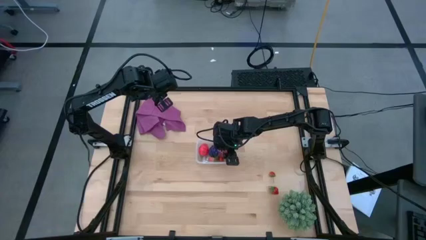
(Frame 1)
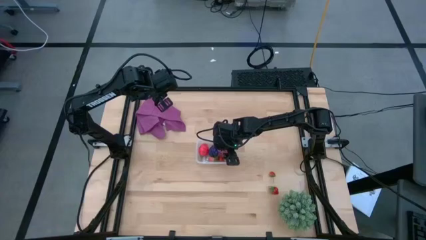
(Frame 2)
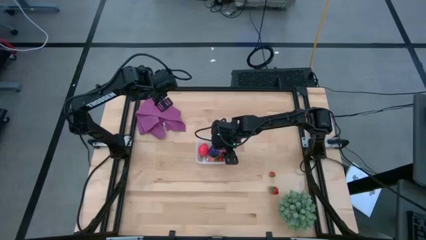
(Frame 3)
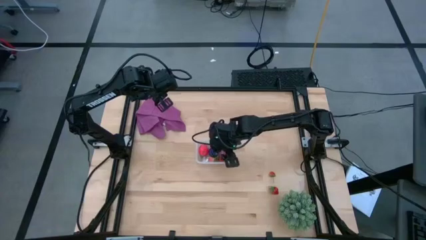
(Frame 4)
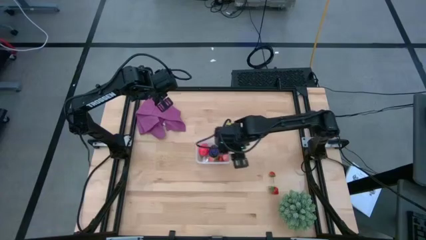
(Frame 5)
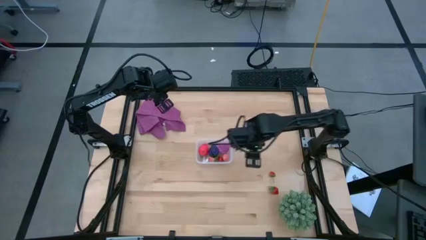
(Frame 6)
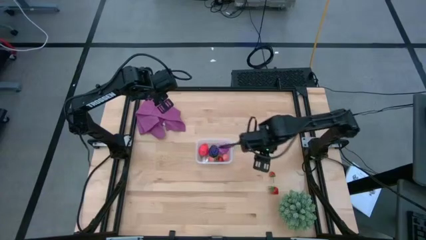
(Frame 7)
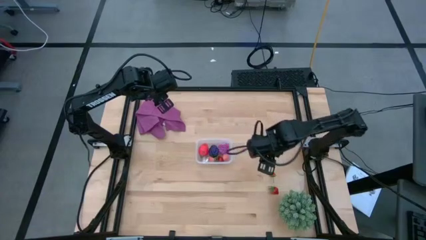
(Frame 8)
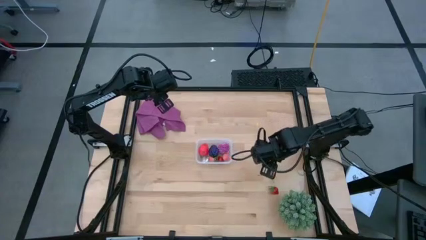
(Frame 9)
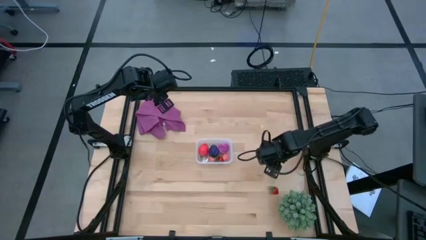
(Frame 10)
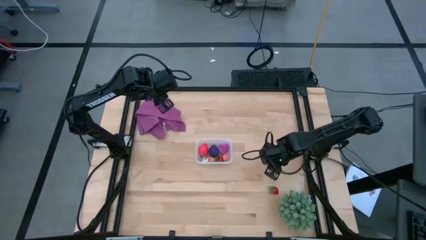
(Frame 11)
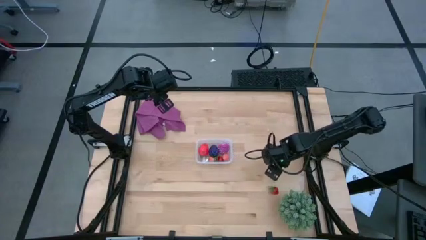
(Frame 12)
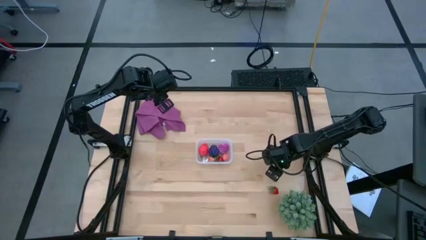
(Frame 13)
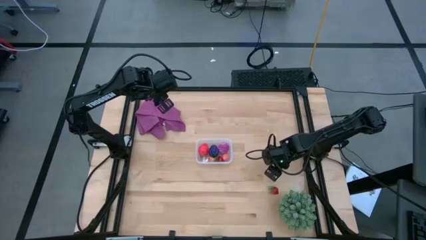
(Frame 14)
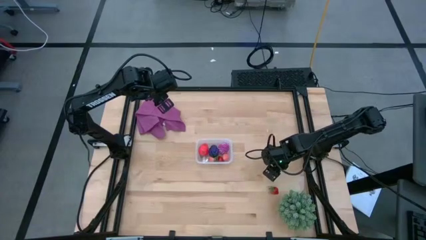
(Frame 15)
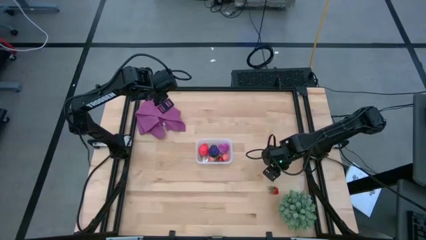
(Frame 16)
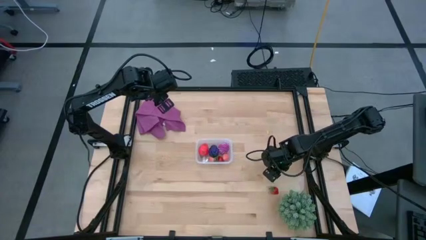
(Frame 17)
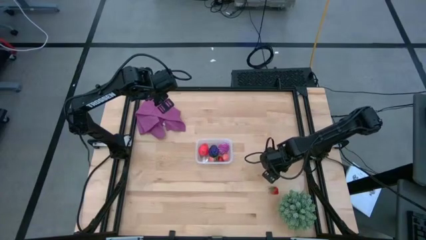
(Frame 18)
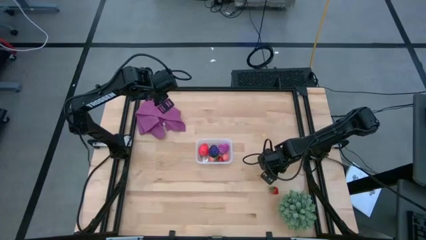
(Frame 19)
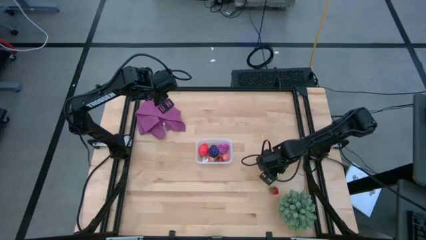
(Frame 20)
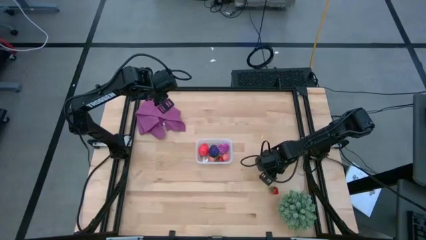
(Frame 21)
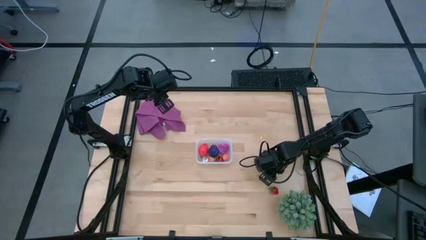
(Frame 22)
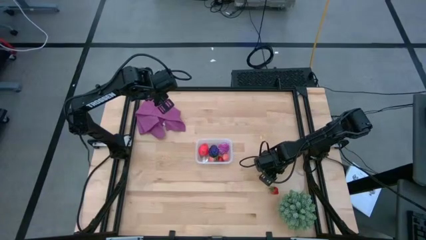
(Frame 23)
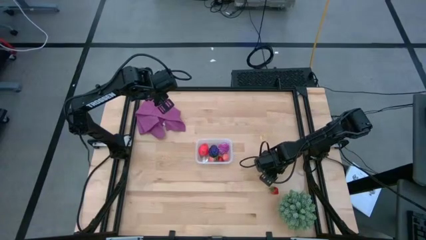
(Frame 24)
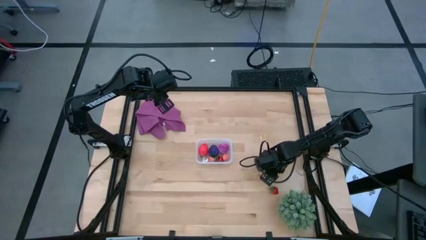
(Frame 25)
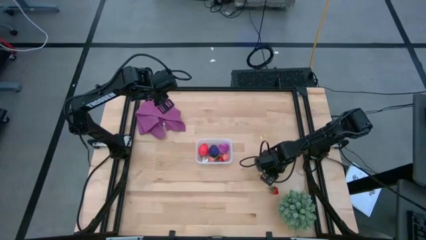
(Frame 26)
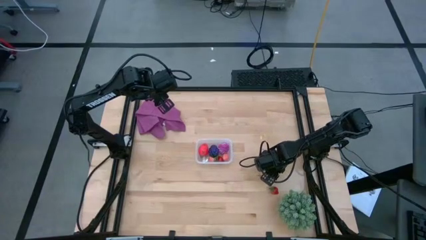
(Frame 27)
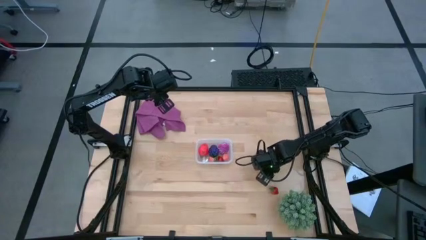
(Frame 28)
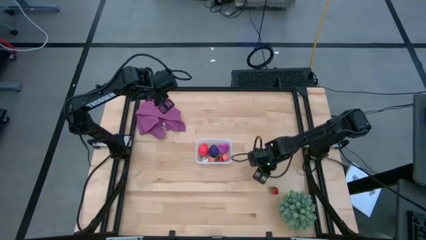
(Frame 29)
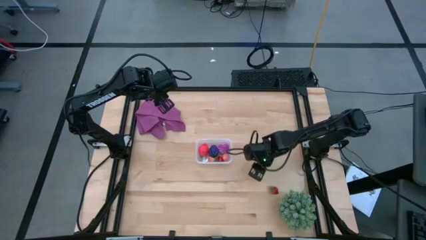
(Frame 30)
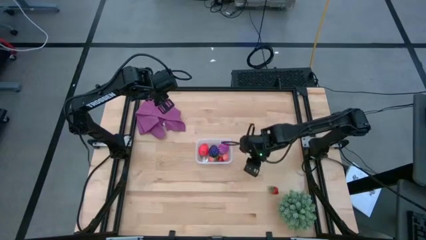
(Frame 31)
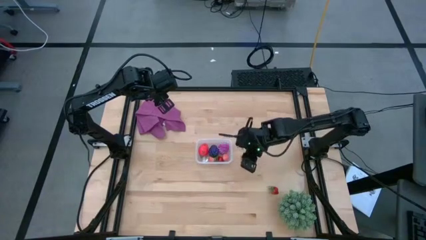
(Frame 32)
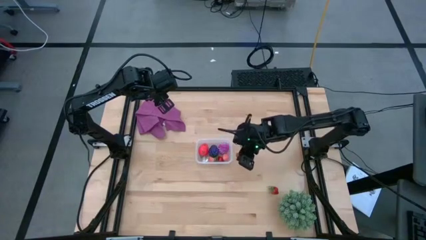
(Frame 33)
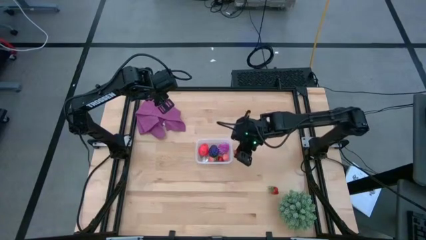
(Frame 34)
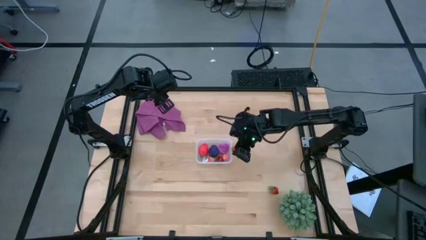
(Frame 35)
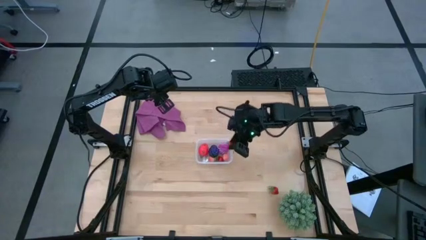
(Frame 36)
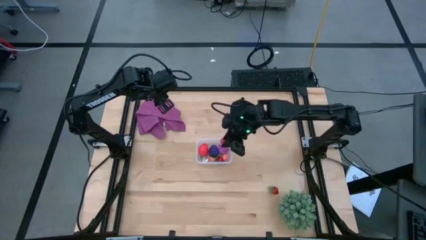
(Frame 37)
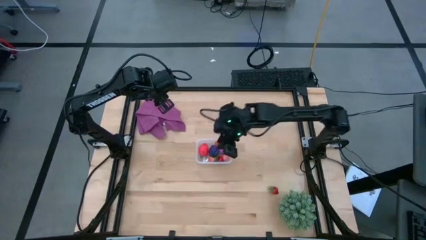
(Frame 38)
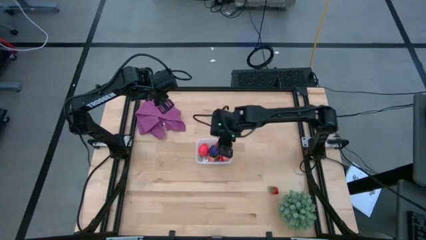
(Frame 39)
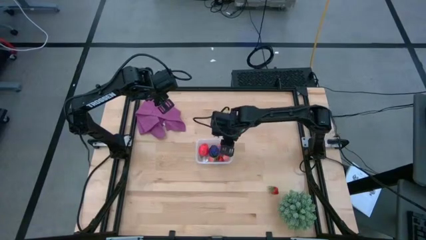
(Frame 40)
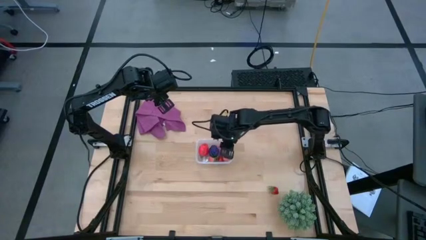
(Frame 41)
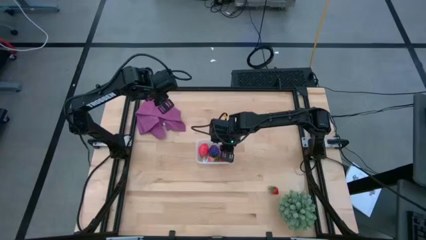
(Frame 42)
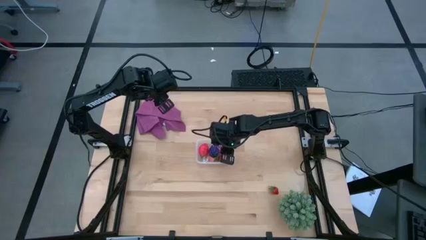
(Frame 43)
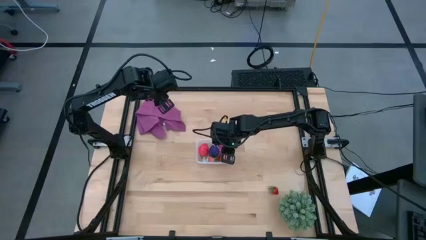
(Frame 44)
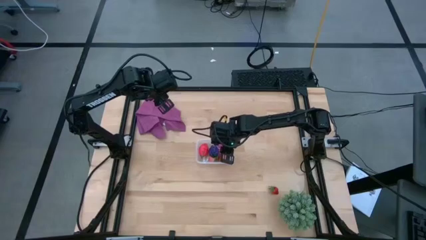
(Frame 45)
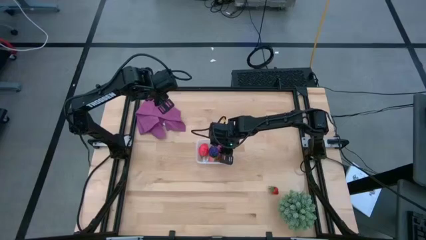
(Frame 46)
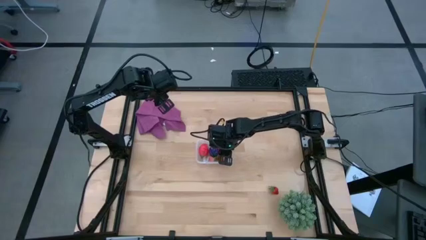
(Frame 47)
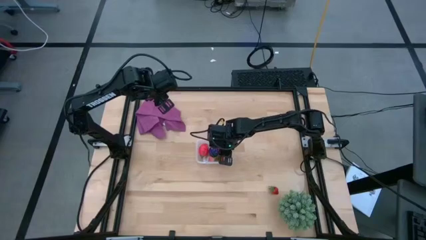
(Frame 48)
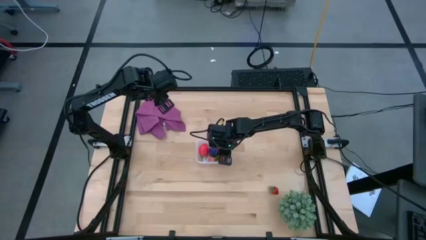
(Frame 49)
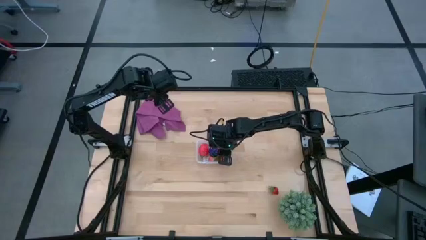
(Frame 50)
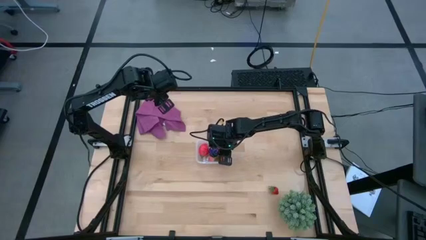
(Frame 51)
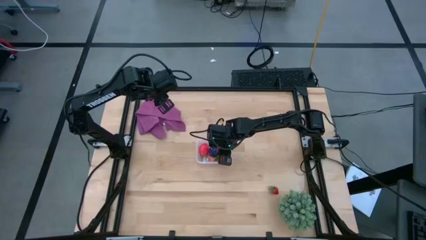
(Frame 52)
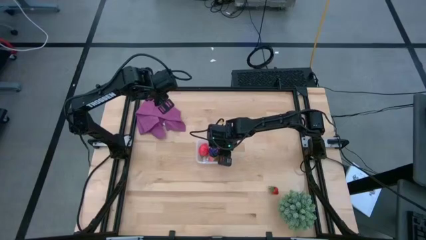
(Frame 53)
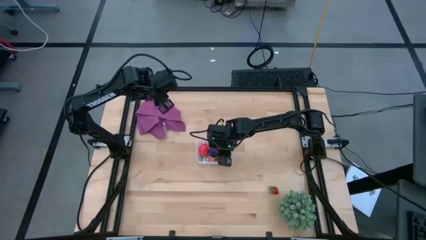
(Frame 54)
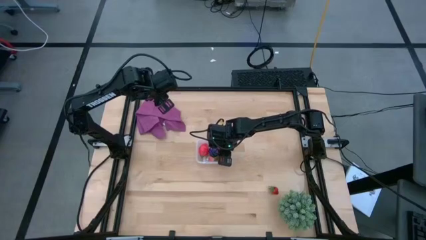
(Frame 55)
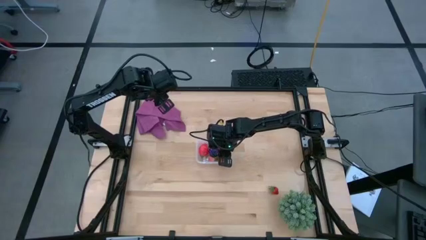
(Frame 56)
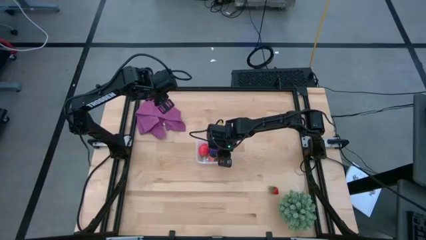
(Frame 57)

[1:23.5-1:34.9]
Task: Pick and placing Produce into tupperware
Put the top red strawberry into the transparent bin

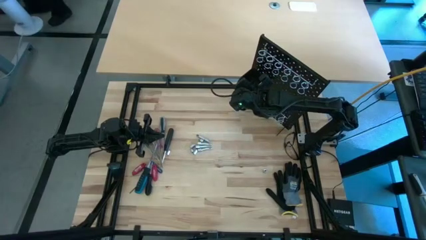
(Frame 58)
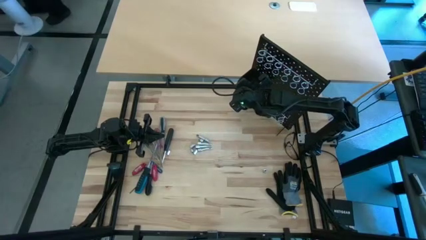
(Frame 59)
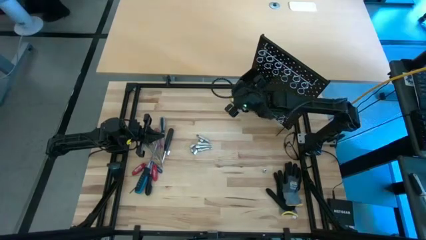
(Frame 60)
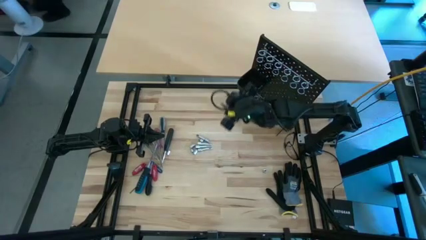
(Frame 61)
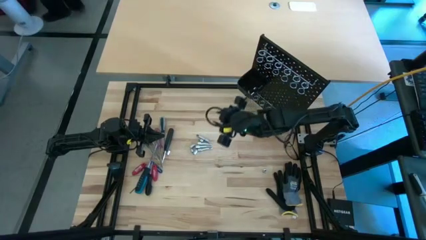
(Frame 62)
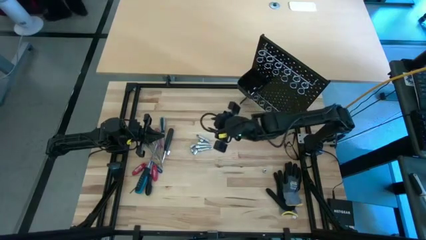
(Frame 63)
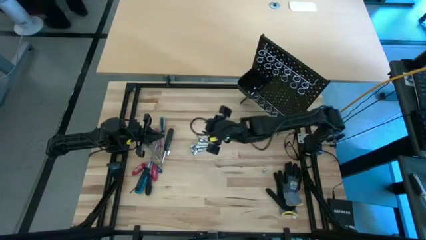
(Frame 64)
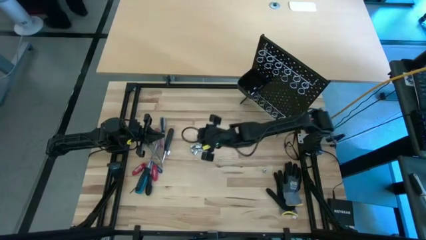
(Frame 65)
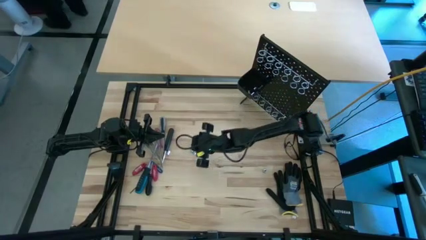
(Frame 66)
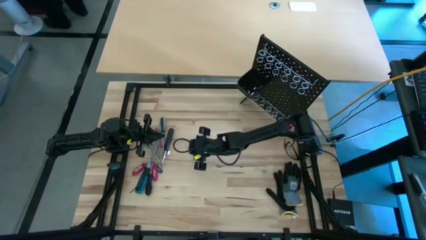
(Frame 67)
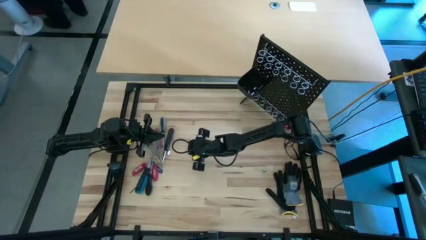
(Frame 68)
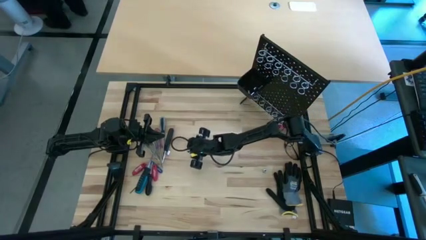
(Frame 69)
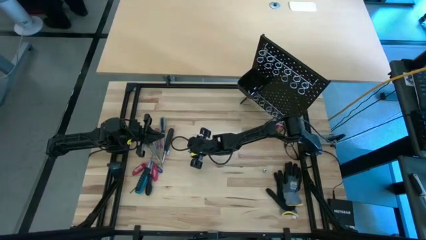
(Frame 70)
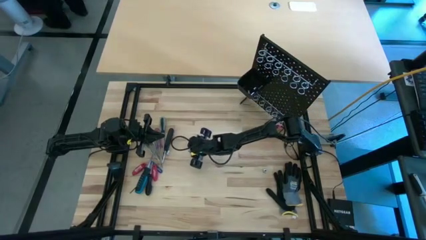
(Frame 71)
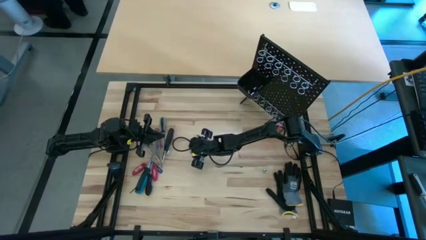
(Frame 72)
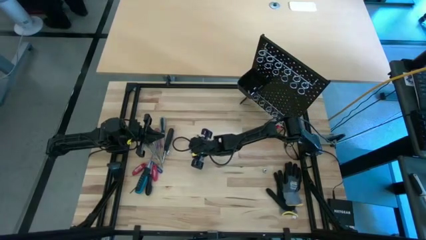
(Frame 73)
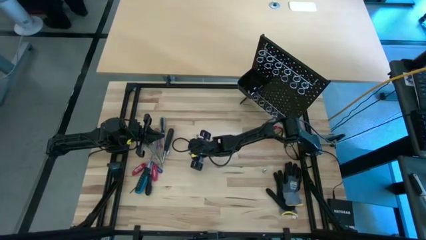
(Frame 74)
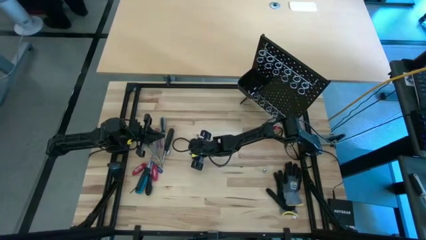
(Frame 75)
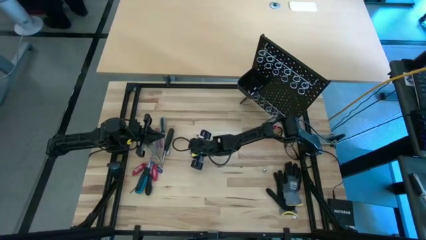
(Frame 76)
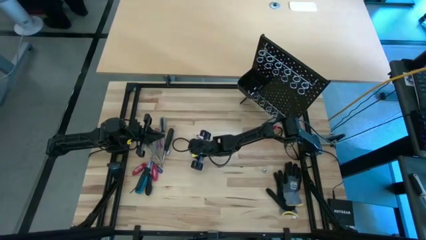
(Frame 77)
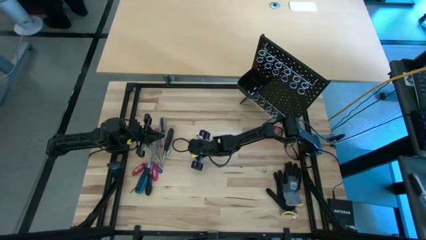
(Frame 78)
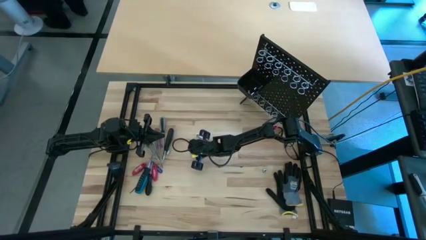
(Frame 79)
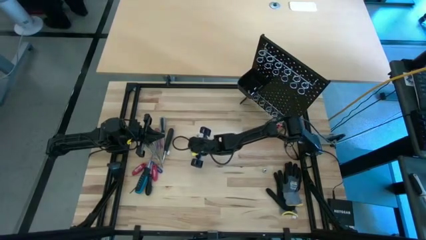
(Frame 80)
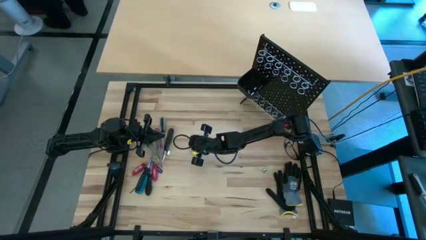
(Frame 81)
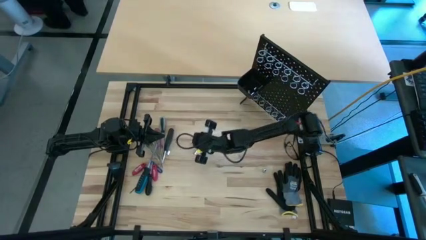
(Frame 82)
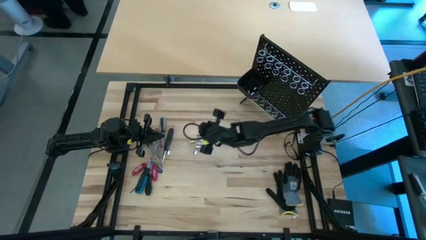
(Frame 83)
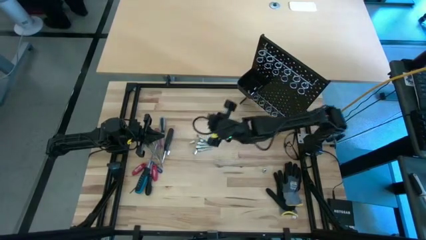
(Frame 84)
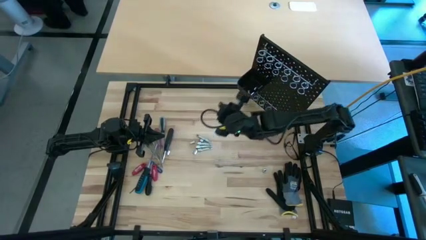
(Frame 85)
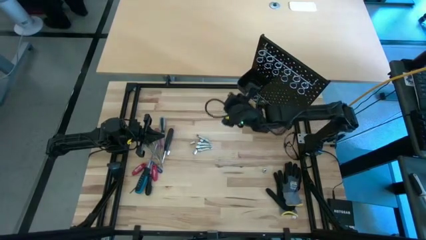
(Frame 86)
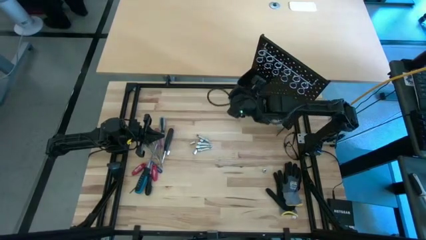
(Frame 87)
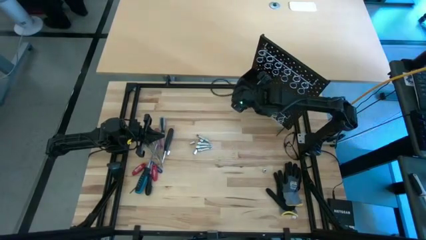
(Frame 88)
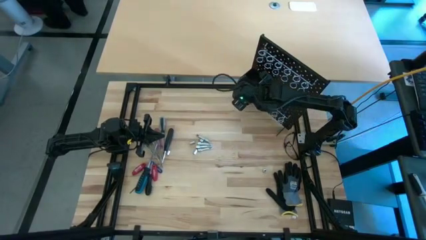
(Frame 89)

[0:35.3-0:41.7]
Task: Hang tools onto peg board
Put the socket into the black pegboard bin
